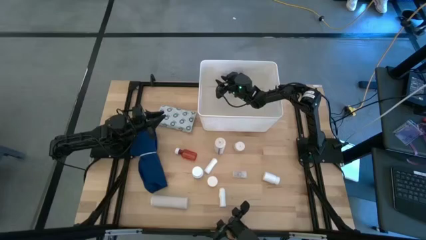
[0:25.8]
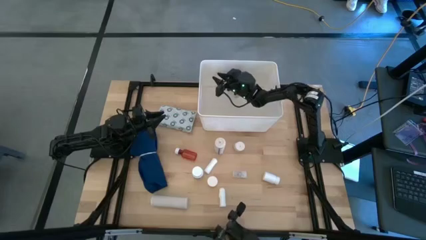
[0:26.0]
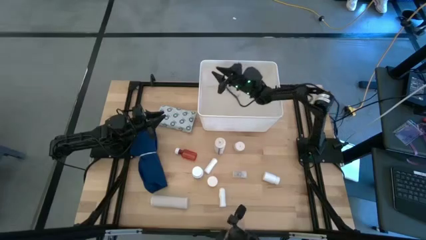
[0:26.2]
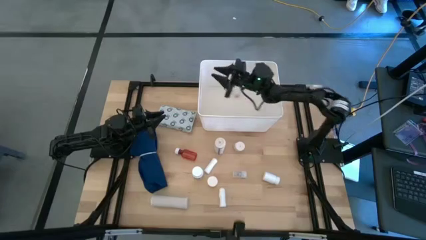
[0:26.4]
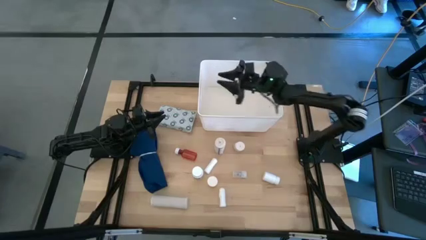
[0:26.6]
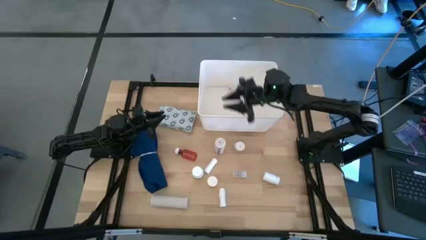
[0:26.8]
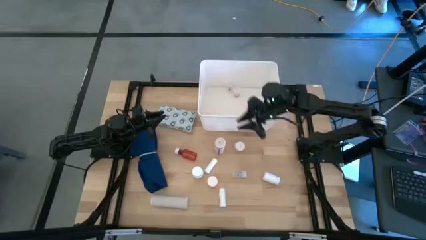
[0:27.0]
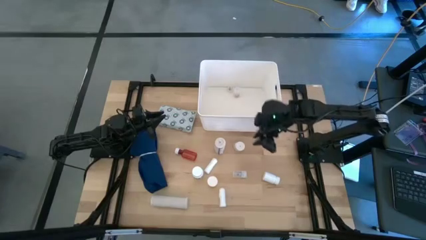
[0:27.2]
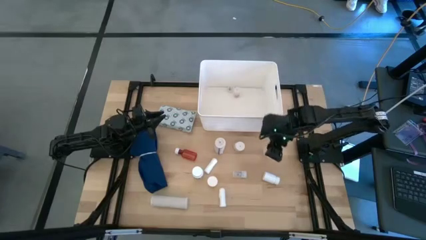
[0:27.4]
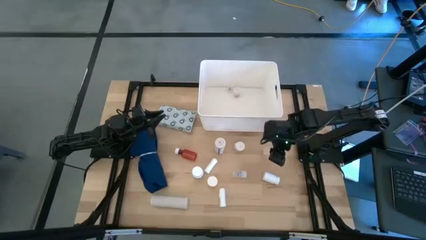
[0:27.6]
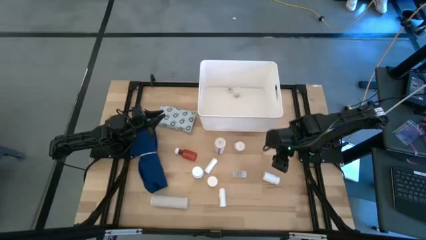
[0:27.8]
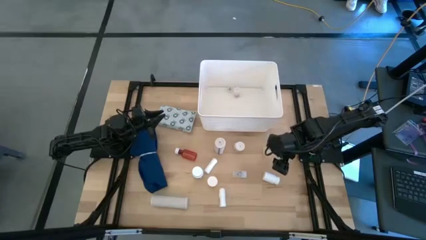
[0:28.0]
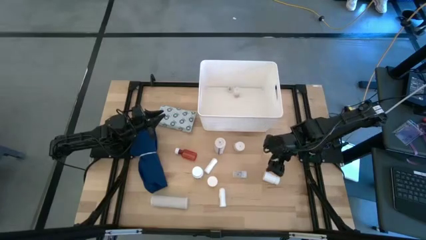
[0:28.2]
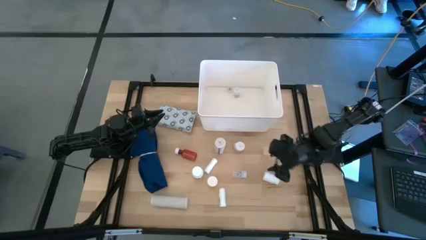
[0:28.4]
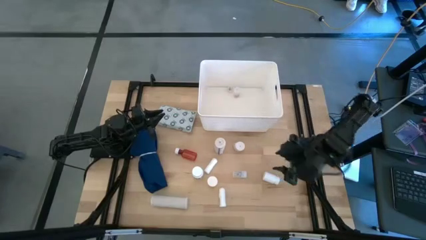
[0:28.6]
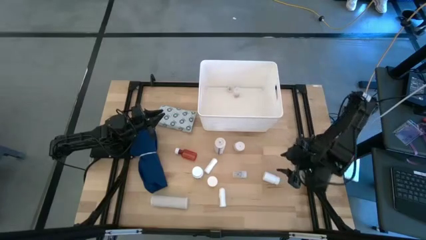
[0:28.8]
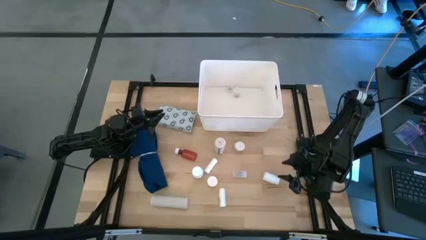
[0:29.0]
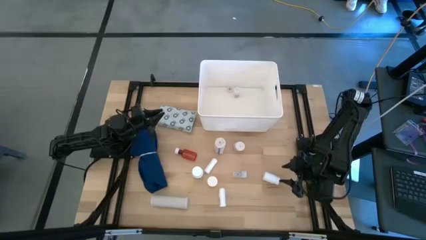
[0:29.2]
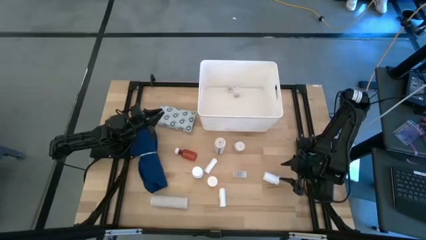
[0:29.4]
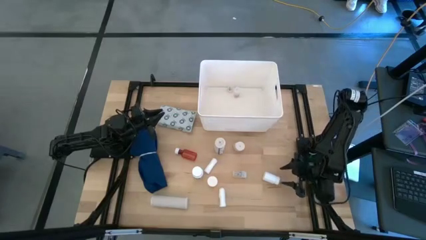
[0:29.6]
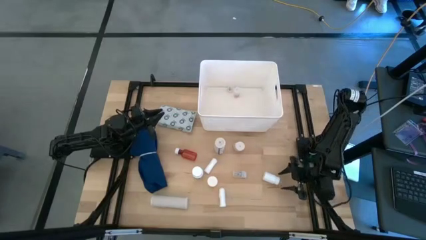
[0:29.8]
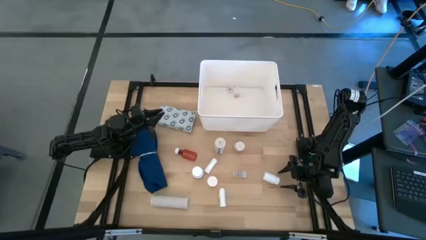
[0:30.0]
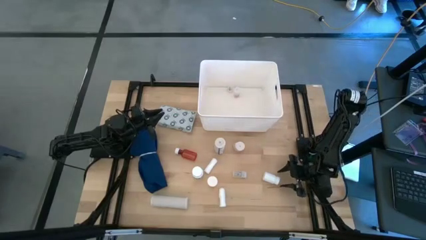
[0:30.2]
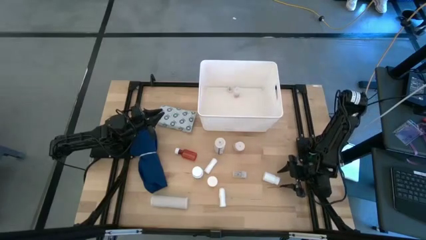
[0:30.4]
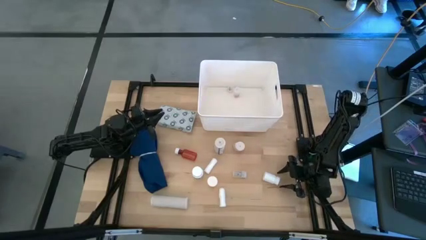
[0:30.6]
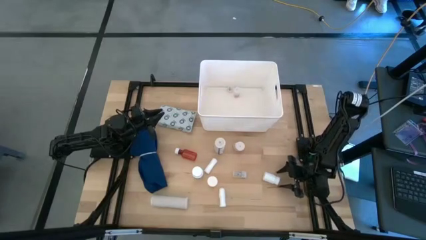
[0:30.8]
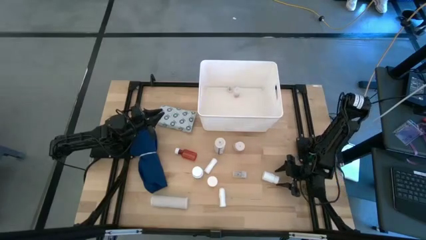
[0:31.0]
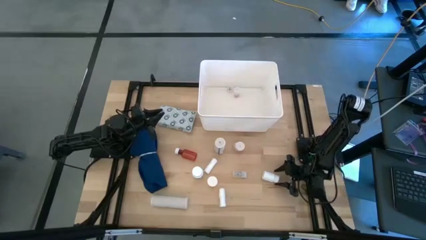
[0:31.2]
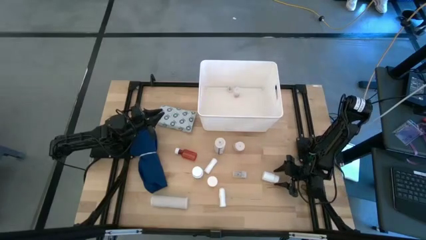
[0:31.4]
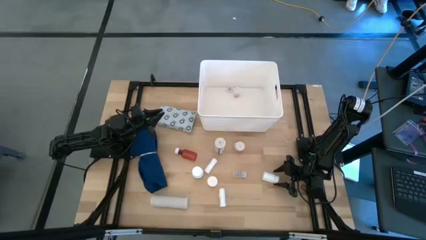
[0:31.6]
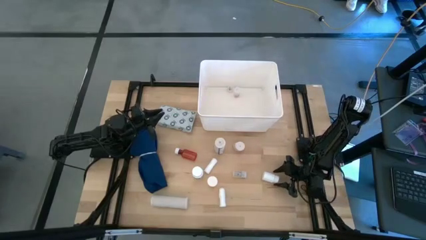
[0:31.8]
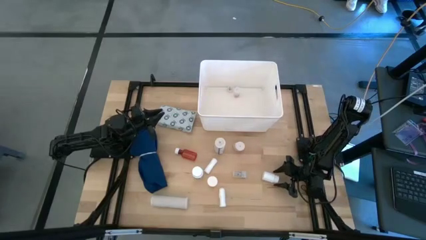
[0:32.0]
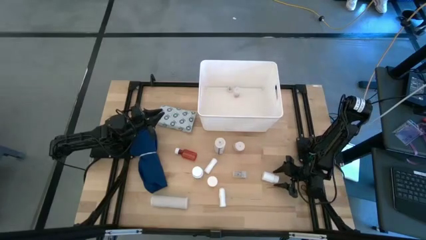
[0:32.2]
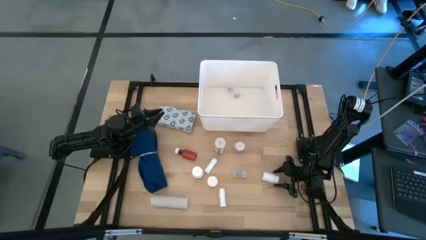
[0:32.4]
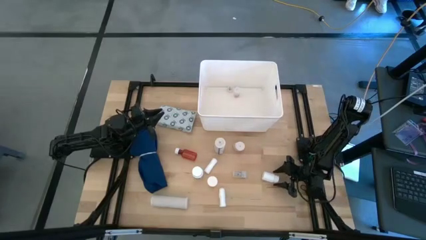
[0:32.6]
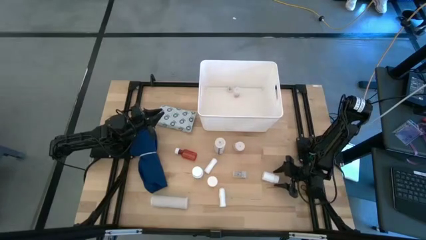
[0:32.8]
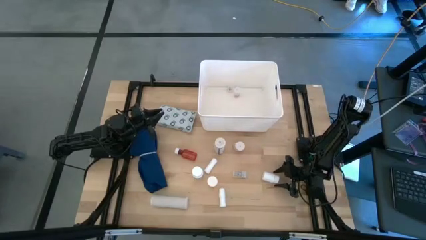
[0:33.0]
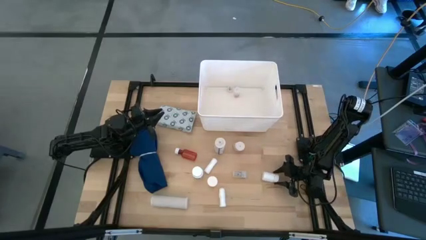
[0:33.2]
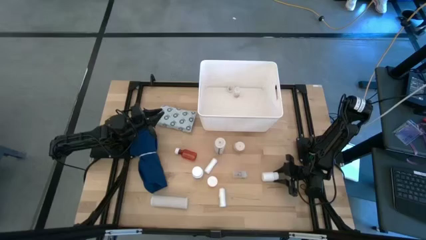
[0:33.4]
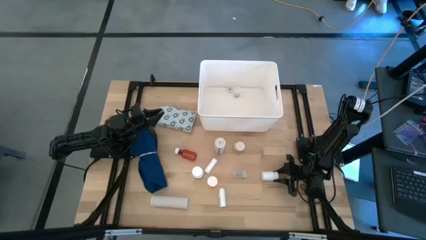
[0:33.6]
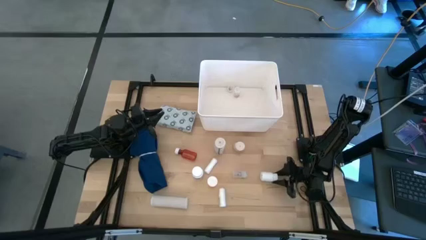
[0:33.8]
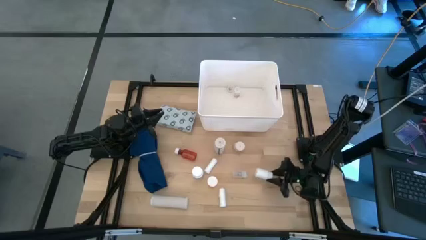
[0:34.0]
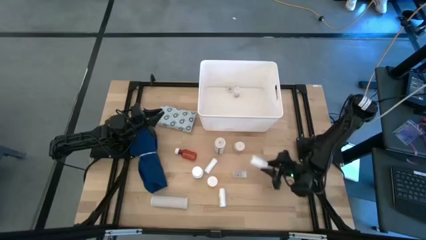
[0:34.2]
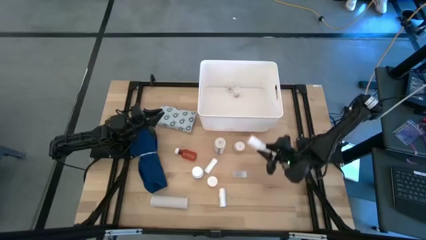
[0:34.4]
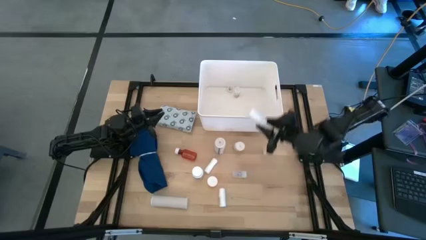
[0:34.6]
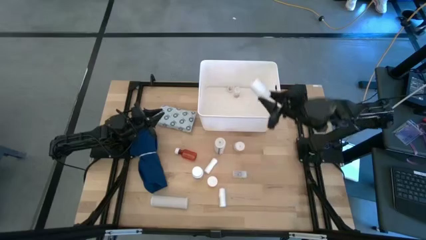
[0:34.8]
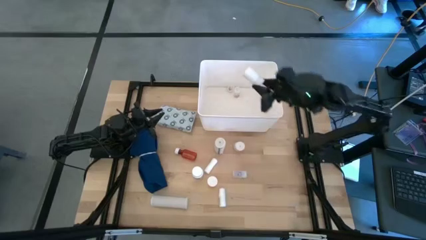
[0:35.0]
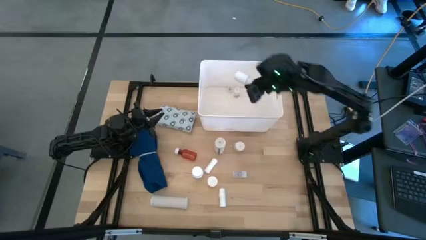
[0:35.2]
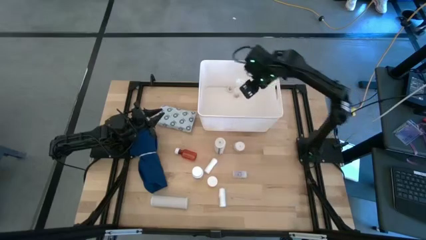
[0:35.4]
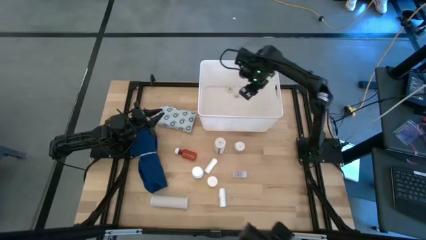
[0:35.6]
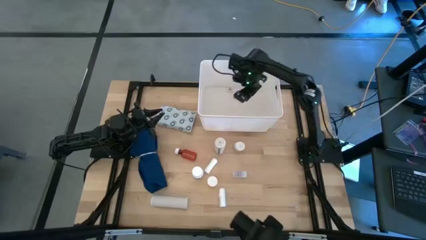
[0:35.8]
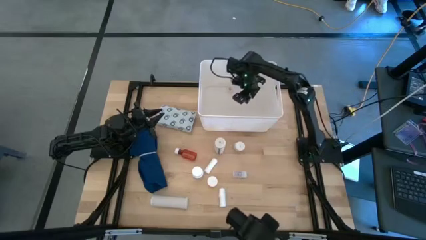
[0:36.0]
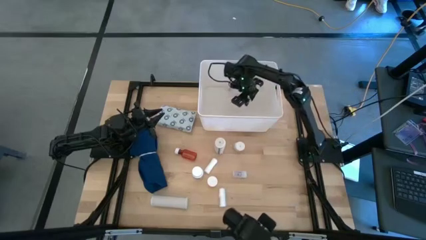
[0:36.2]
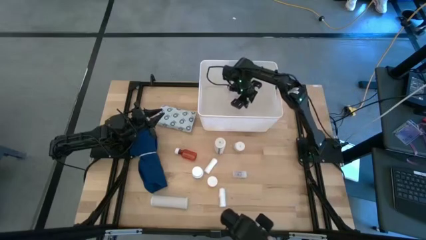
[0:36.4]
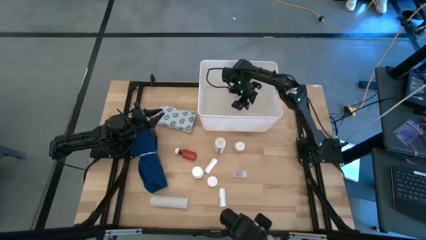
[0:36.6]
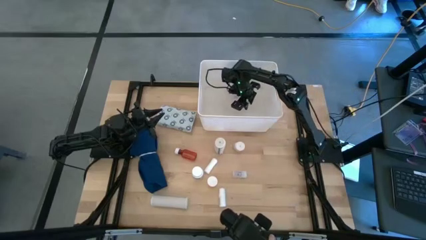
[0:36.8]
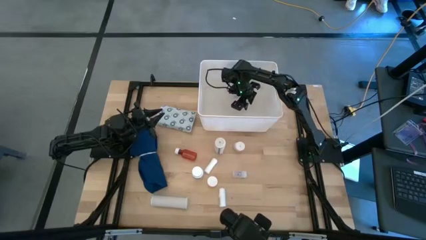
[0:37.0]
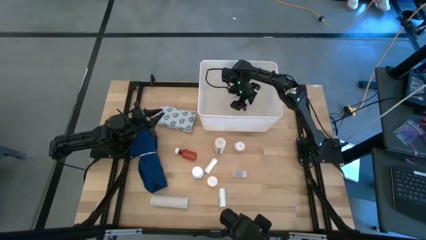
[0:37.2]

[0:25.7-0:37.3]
Task: Pick & place medical supplies in basket/bin
Put the white pill bottle in the white bin

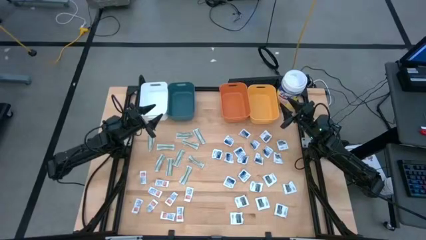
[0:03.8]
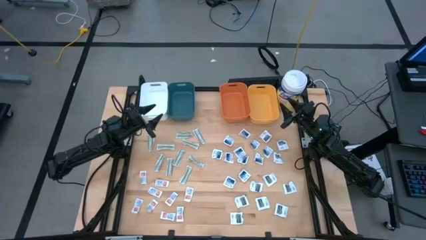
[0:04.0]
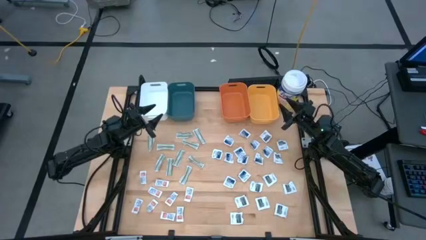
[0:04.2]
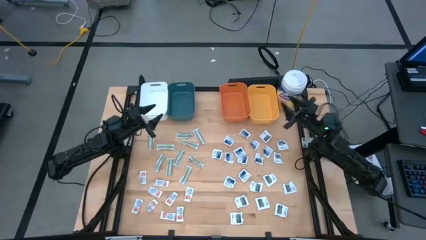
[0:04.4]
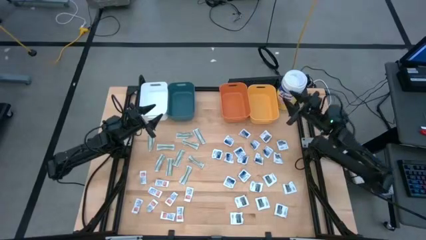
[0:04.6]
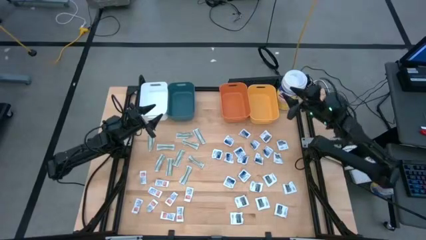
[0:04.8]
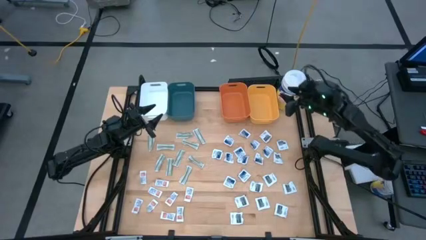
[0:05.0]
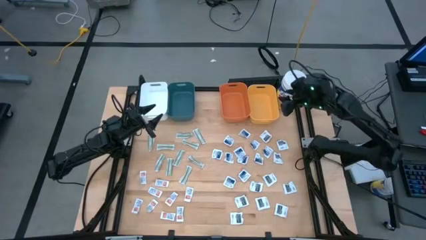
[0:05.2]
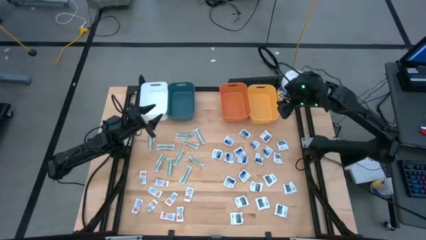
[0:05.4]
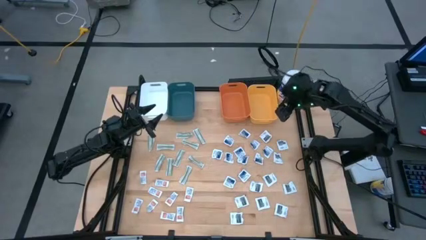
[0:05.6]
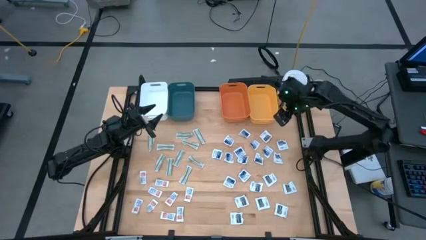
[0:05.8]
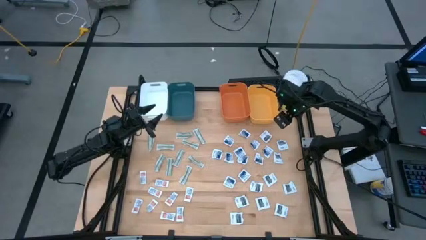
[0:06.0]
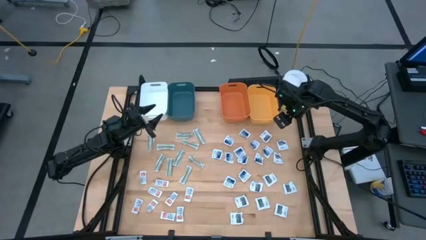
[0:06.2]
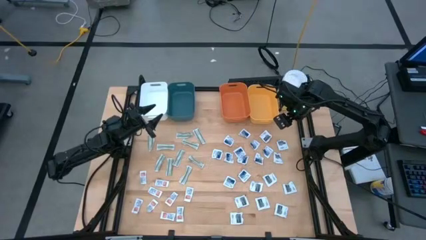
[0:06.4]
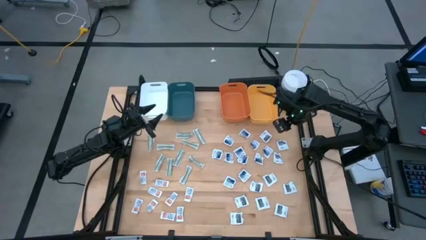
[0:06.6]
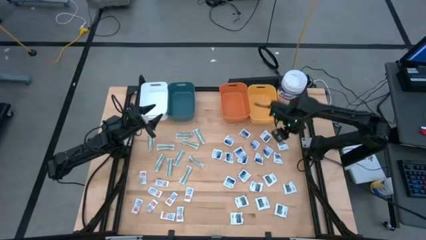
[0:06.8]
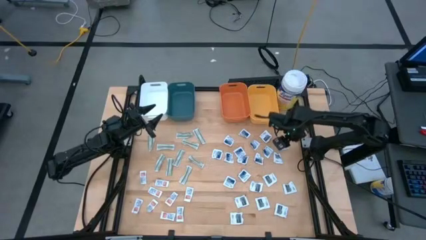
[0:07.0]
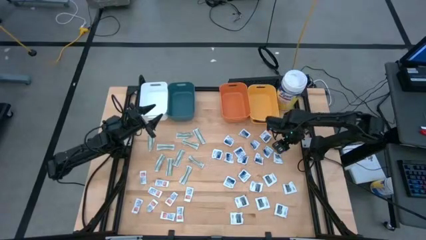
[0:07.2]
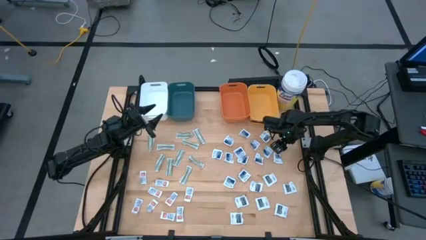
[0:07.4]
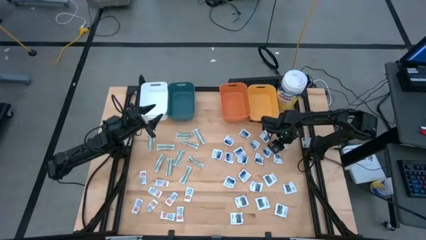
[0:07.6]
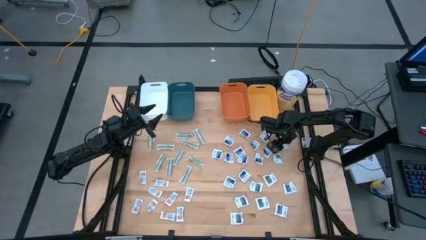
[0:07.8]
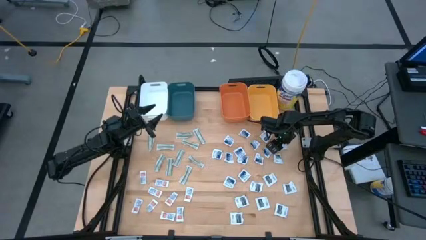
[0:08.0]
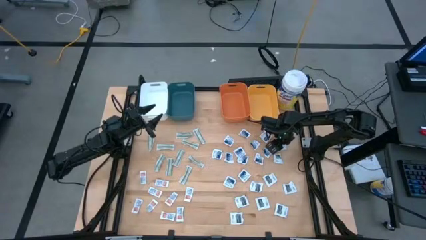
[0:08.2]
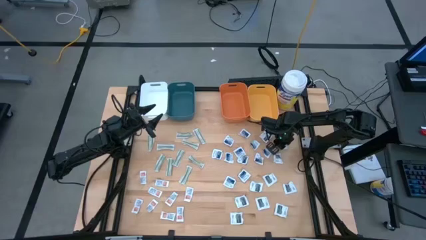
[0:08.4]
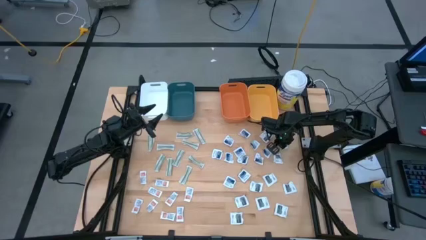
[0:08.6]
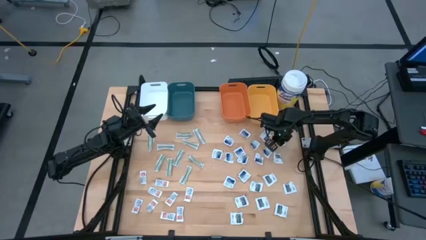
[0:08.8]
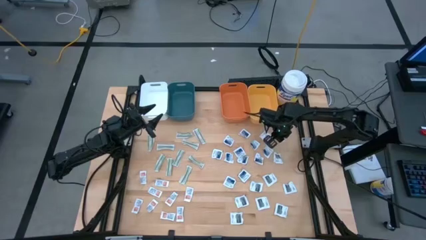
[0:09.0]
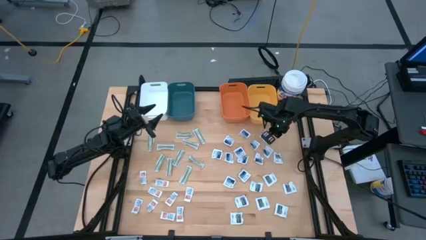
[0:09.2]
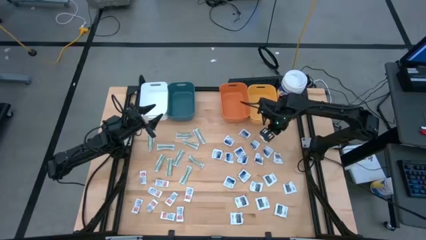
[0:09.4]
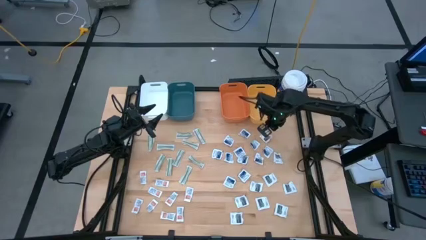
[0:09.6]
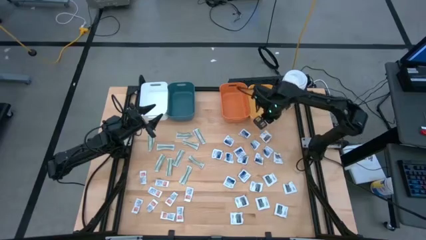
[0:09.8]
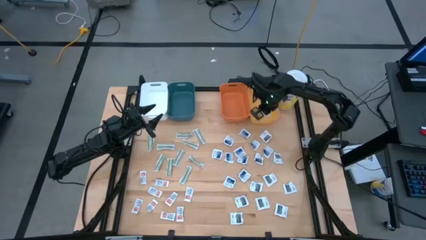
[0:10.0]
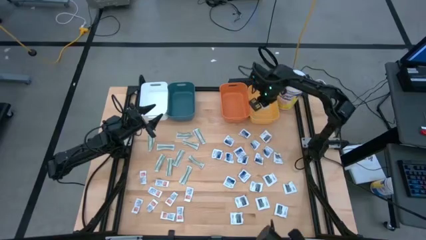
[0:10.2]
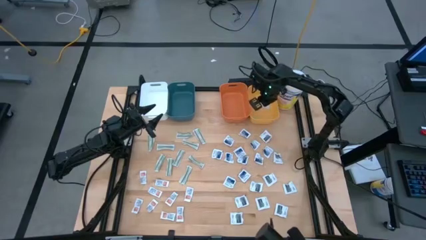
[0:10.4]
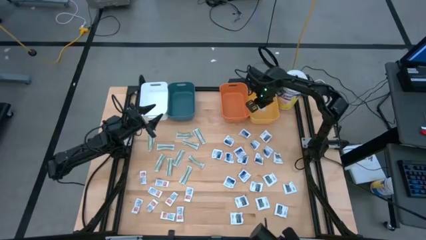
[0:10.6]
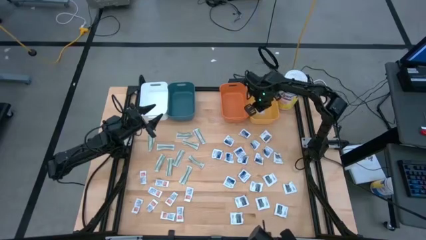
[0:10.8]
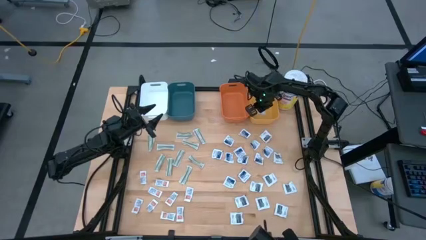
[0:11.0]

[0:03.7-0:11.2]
Task: Pick & Place First Aid Supplies
Put the towelette pack into the yellow bin
